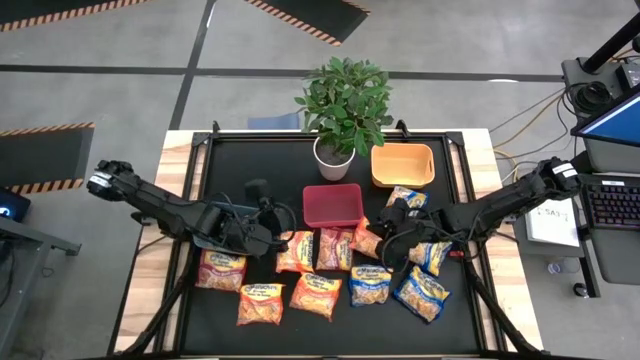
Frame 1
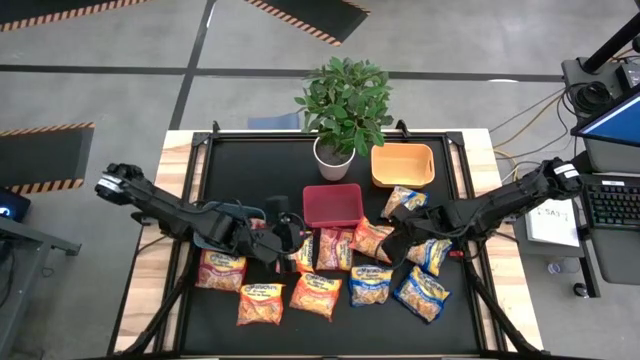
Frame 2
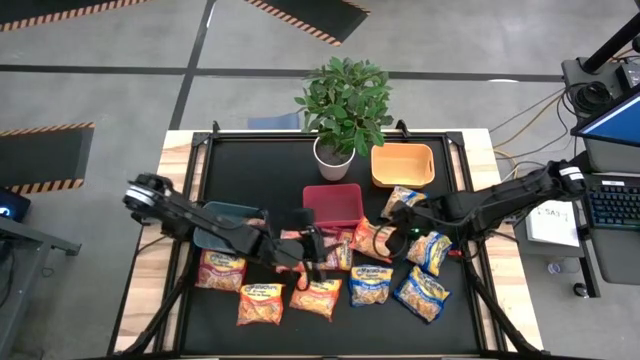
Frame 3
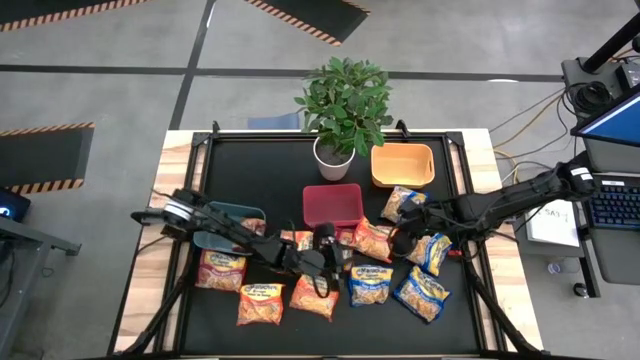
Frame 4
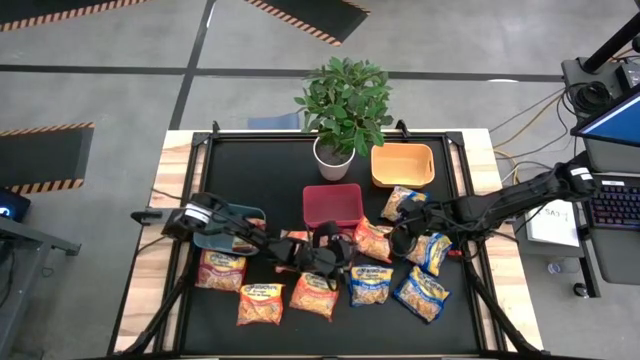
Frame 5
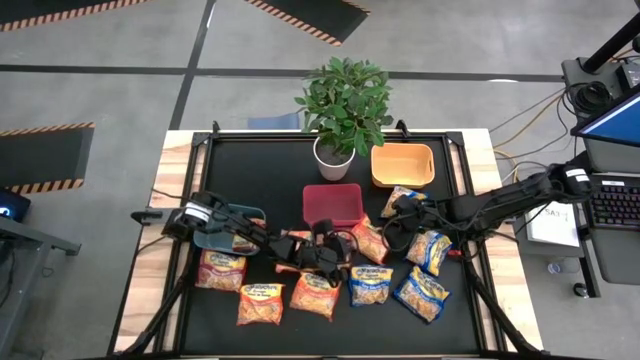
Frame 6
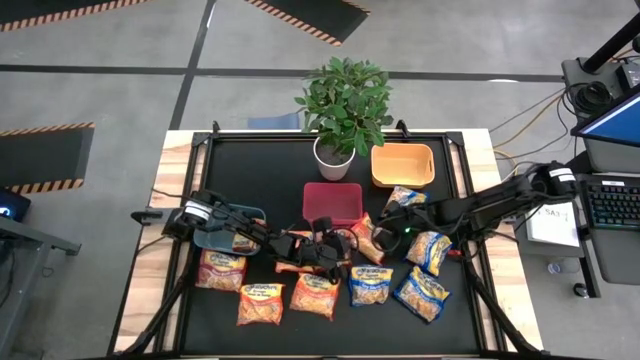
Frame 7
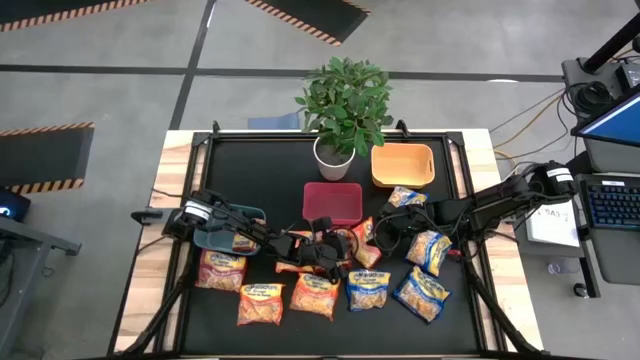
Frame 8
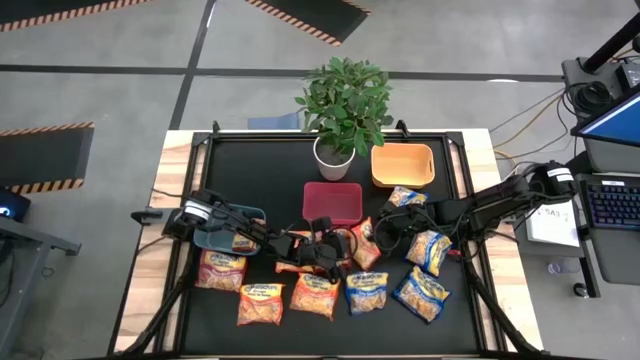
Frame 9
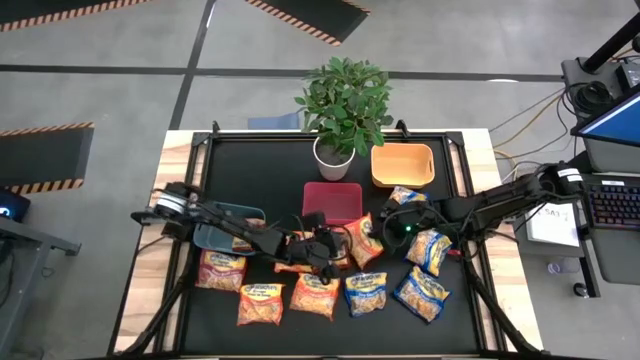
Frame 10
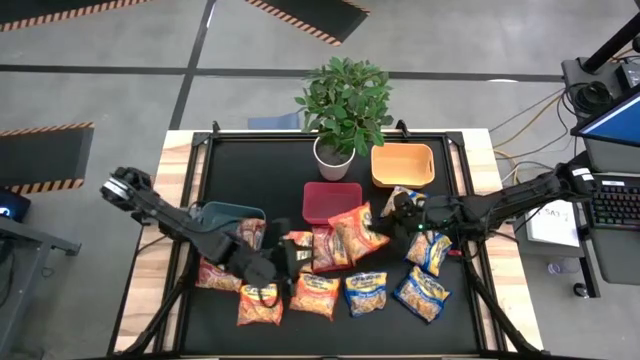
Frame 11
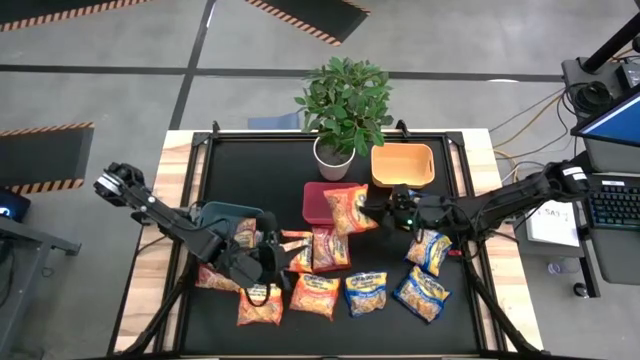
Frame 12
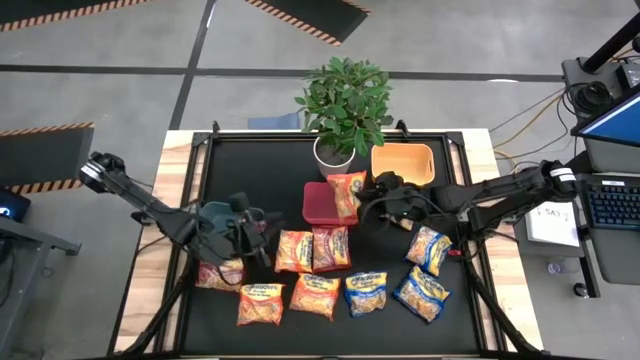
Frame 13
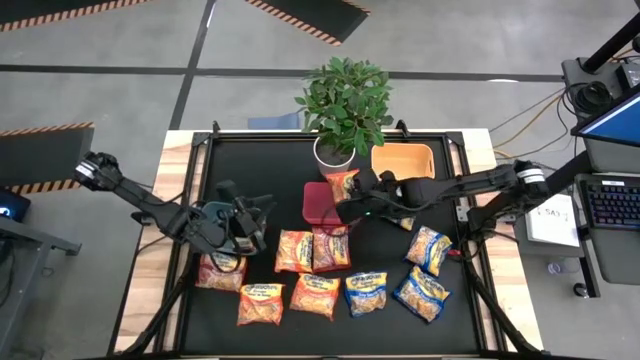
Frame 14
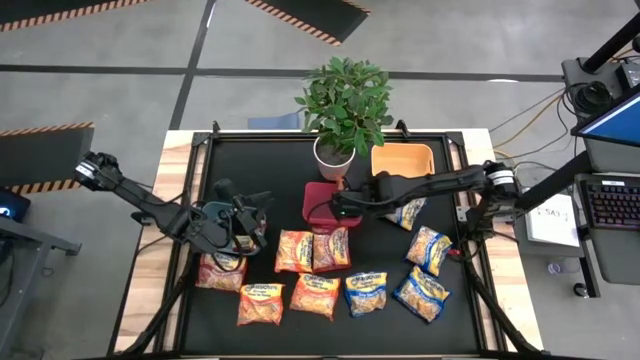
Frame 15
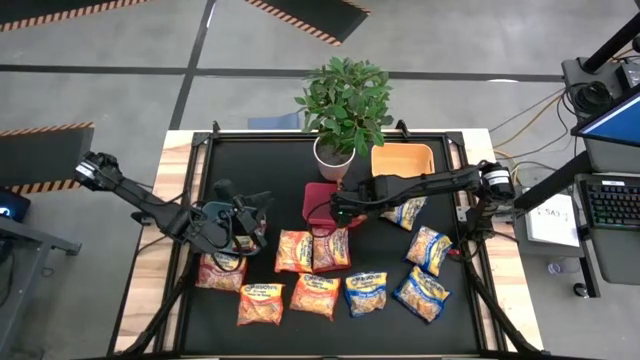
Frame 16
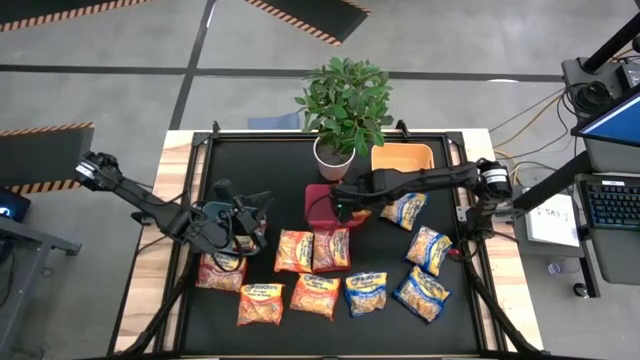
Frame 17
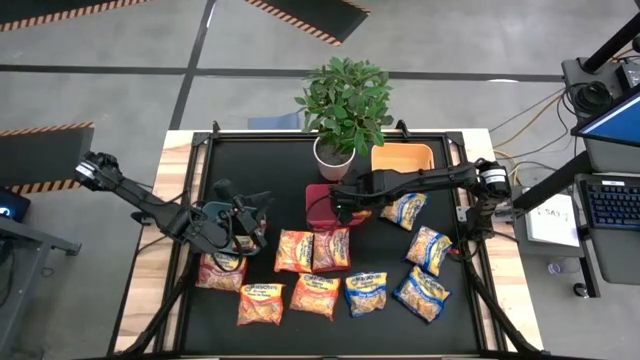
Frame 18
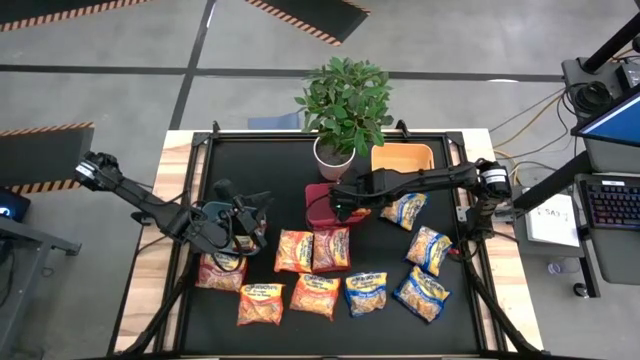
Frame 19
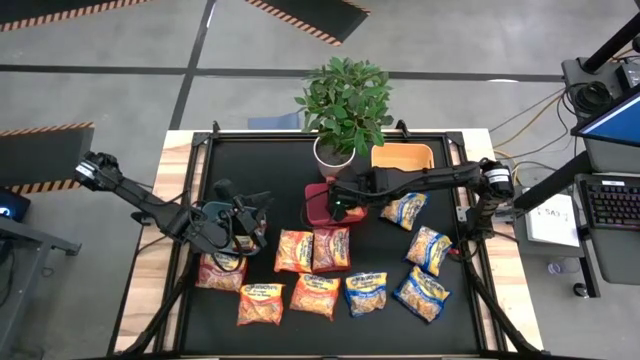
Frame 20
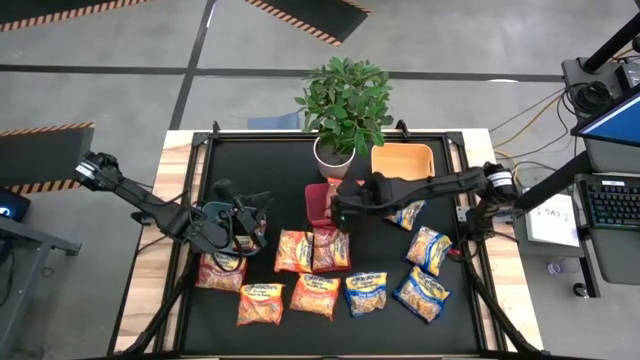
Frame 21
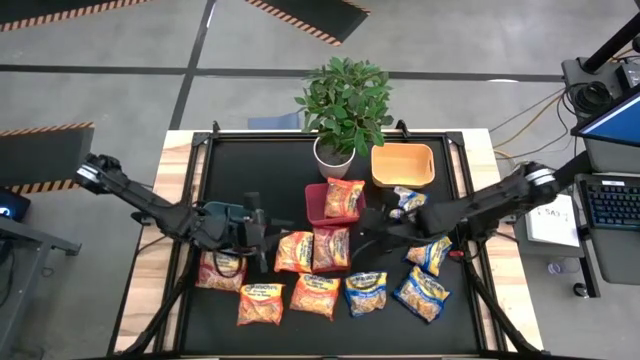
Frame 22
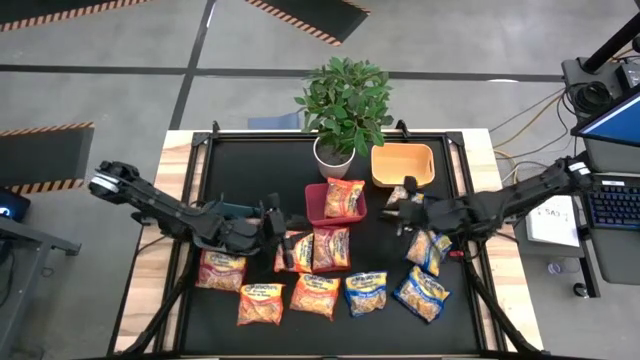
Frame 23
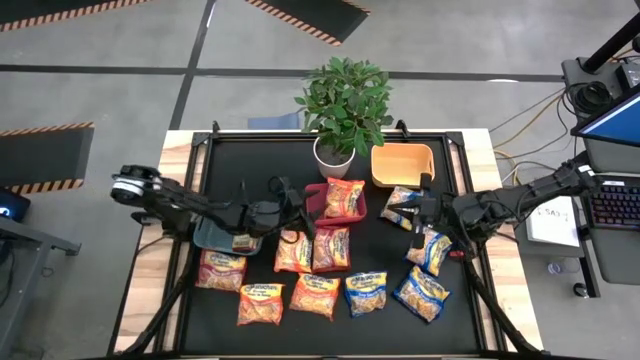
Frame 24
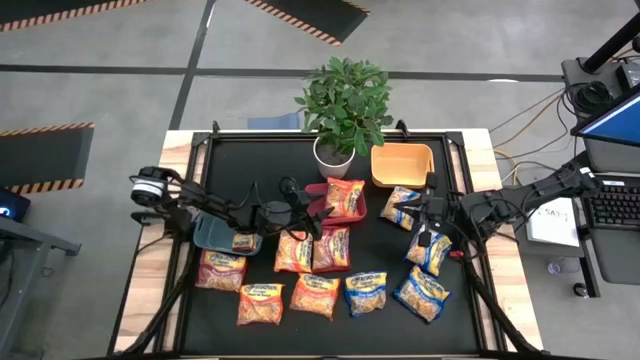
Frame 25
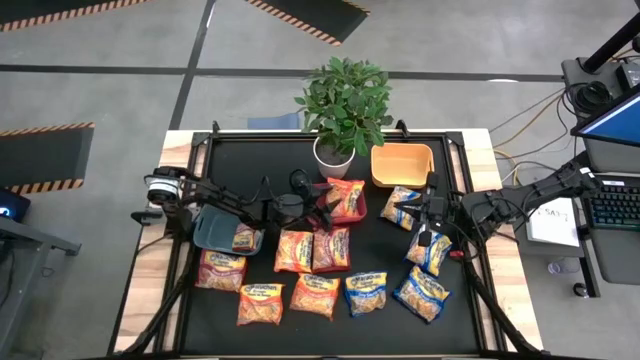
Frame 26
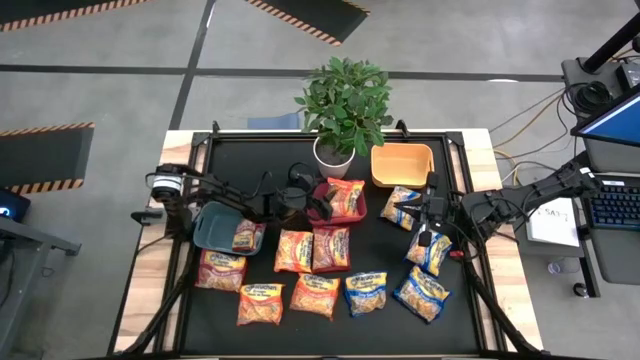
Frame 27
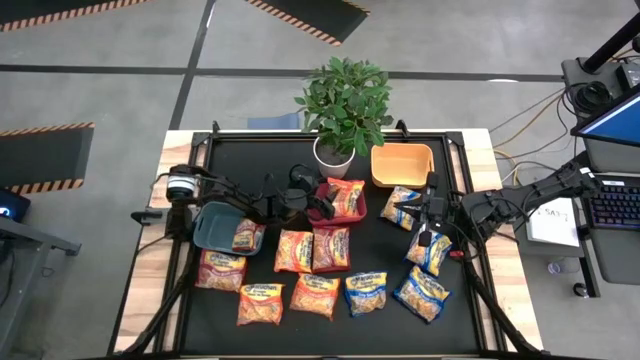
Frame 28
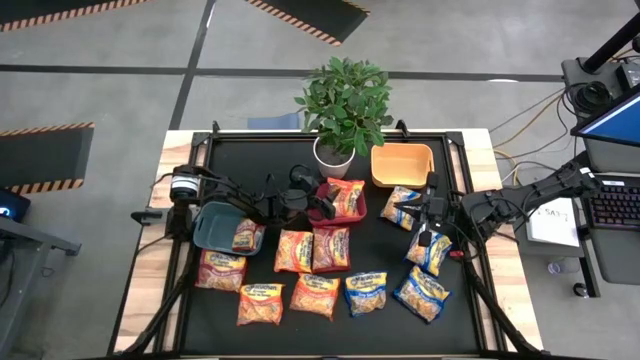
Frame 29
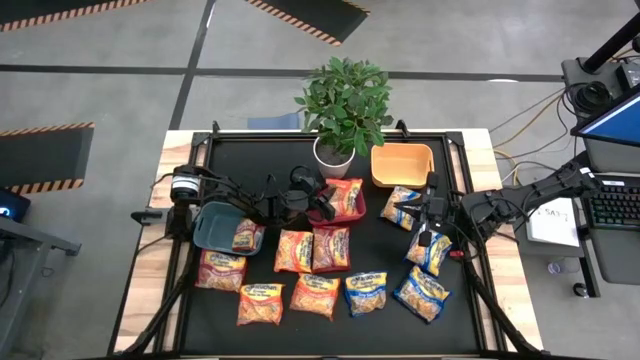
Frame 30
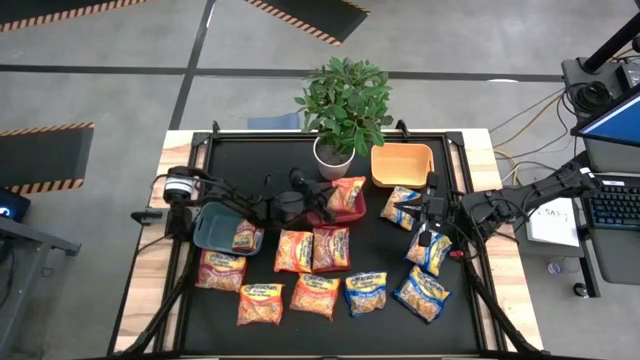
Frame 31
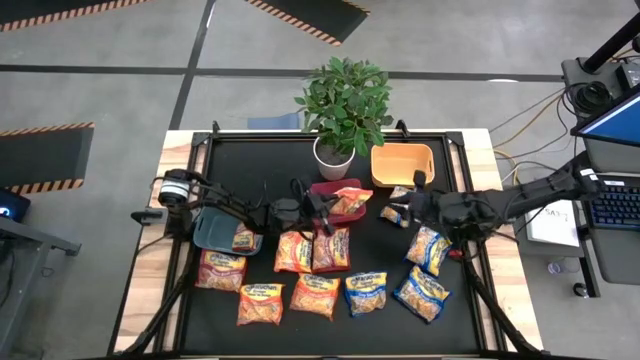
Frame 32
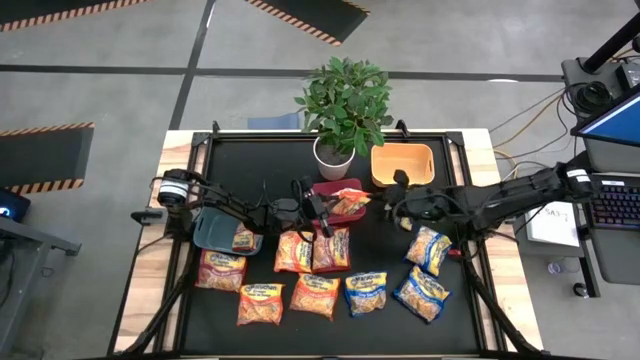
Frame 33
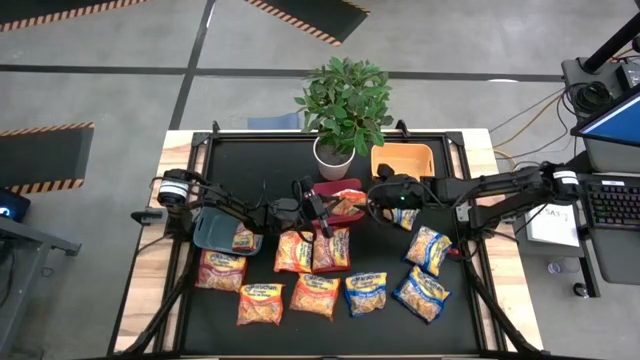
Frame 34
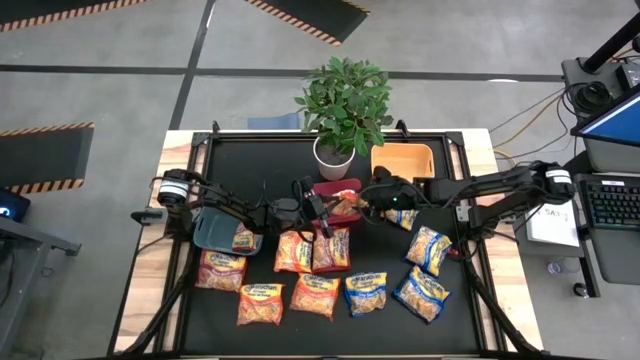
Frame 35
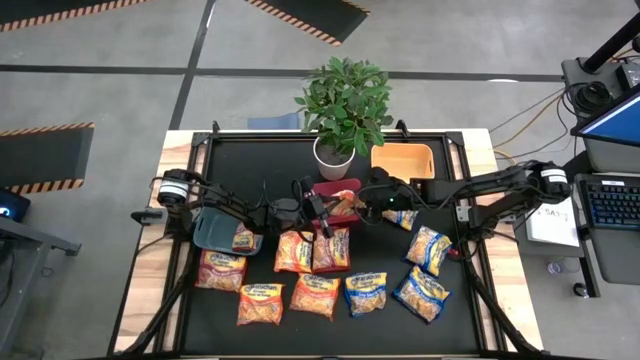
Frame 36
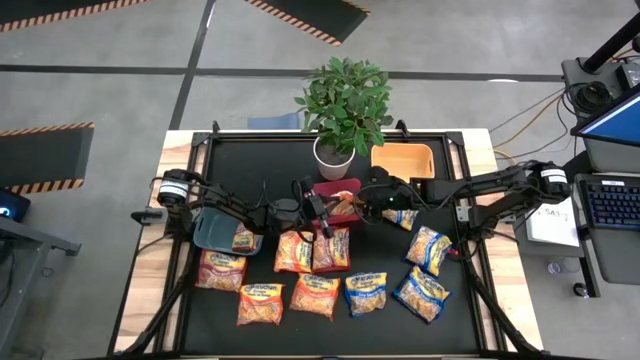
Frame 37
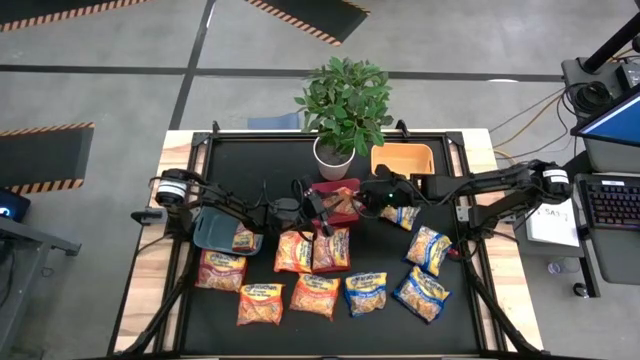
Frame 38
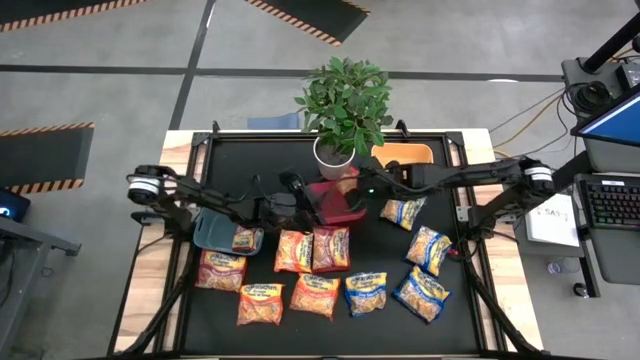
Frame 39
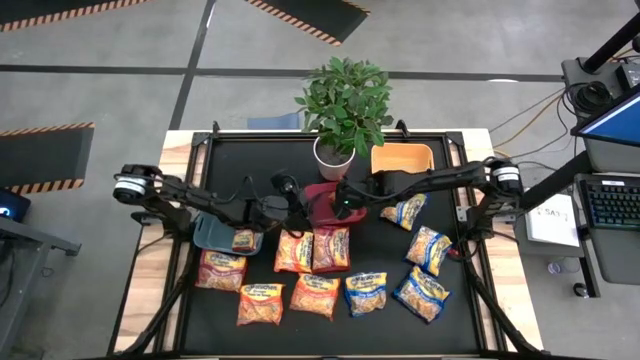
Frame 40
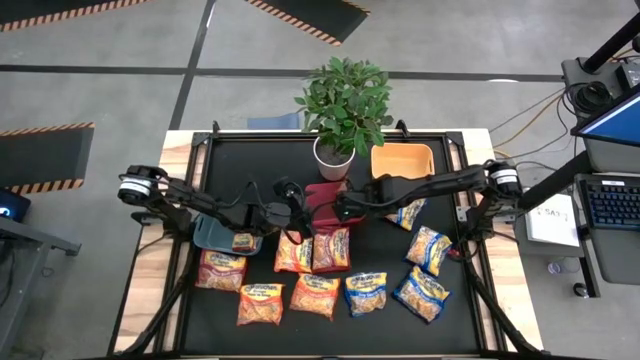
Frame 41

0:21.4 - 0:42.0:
Task: Sort Maruchan noodles
Put the top right orange noodle pack into the red bin
